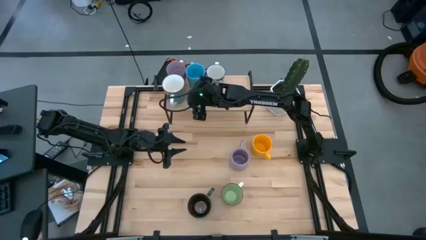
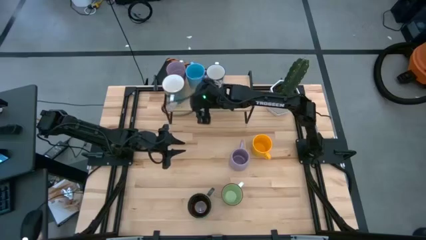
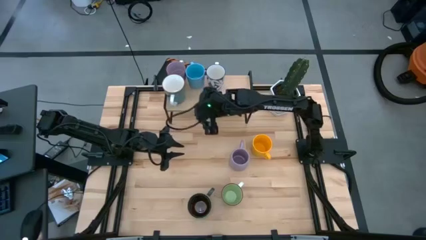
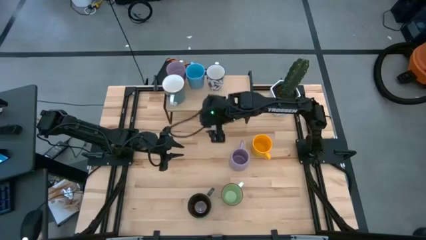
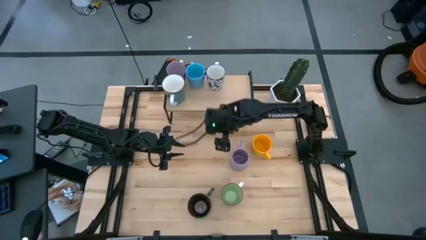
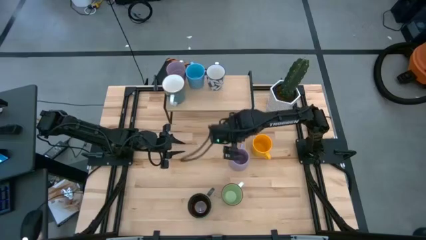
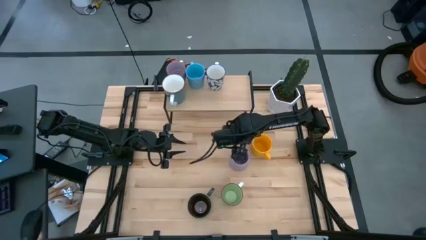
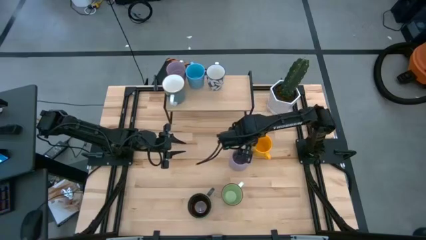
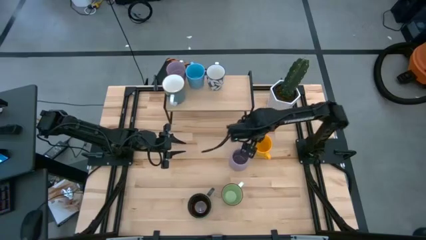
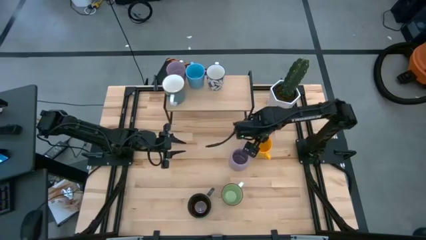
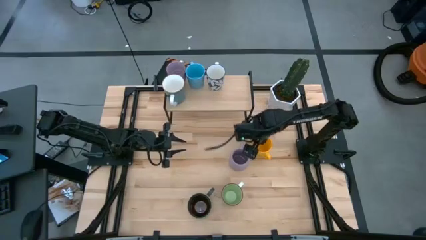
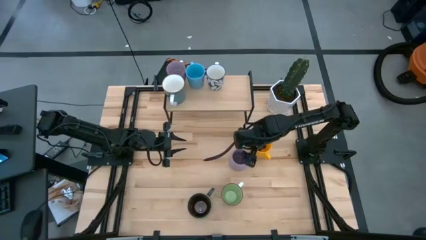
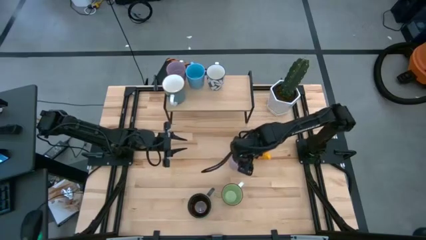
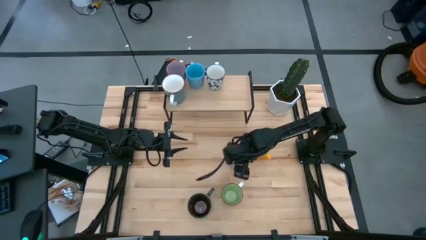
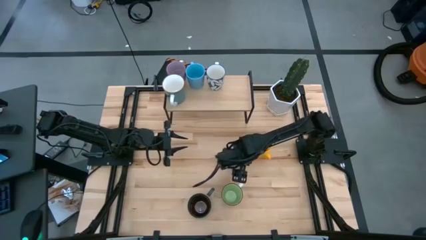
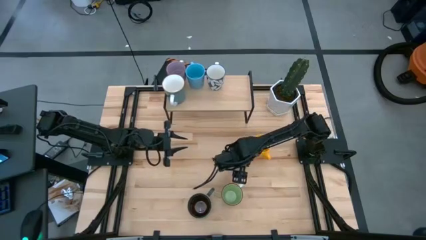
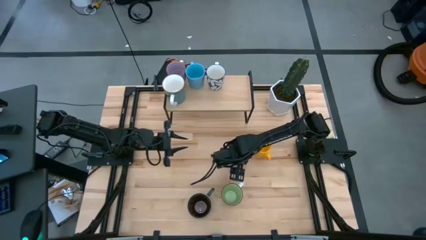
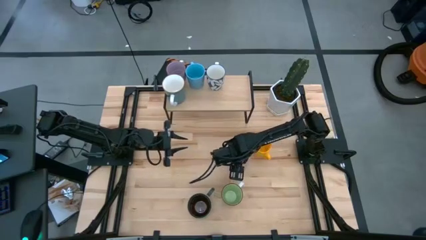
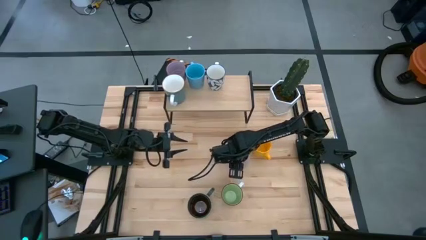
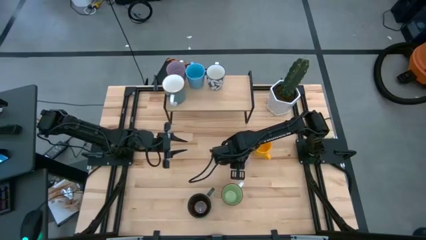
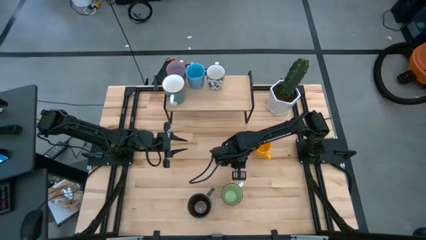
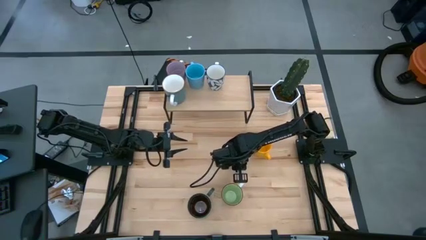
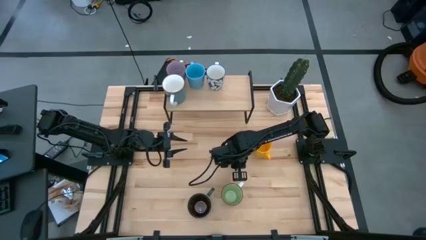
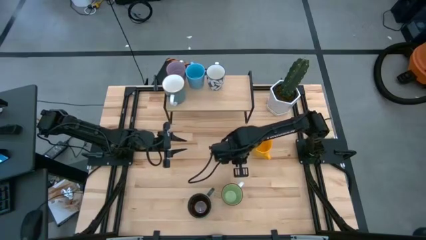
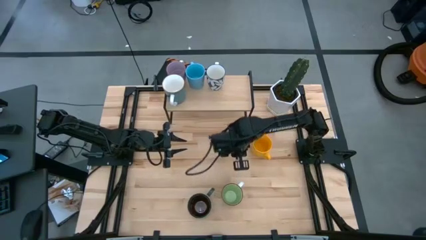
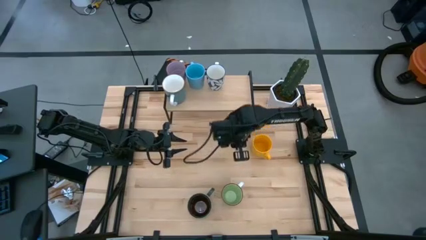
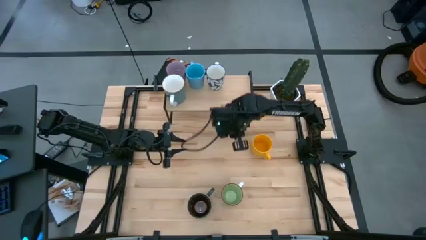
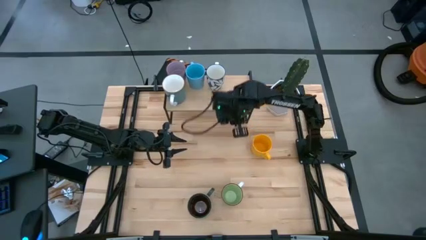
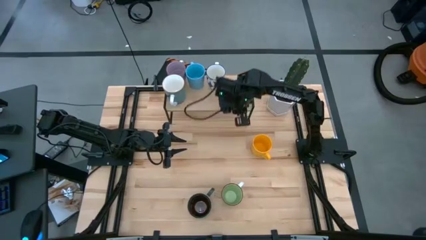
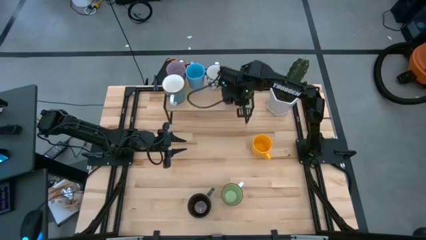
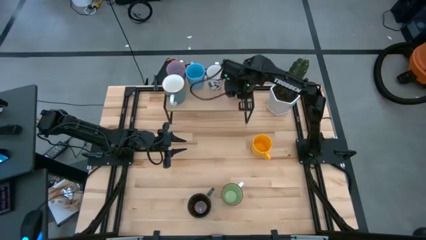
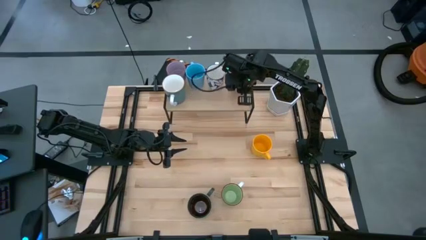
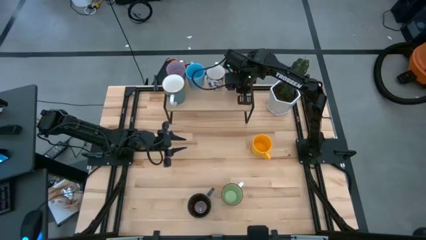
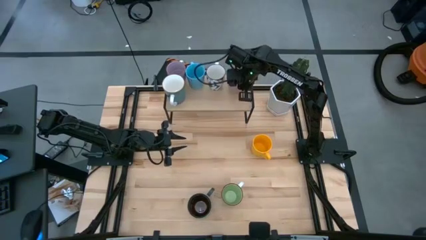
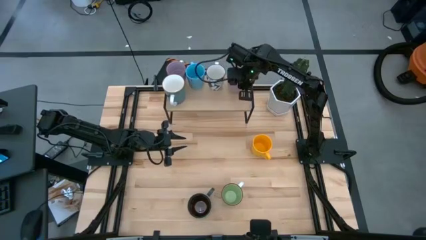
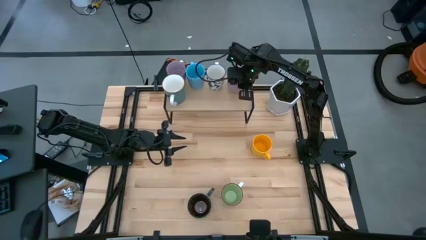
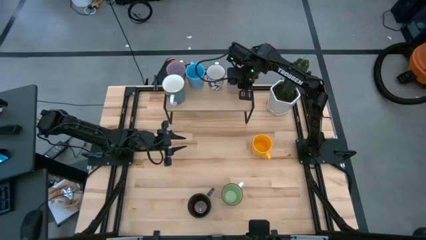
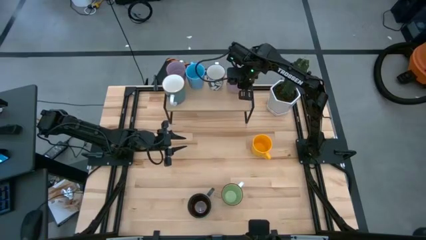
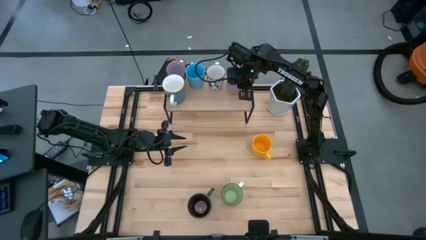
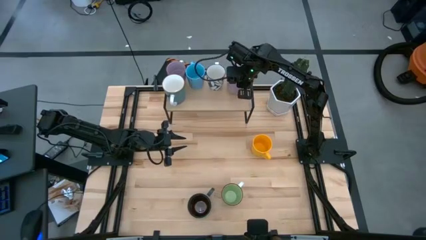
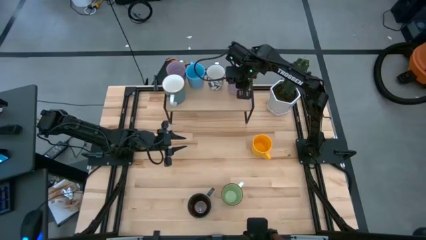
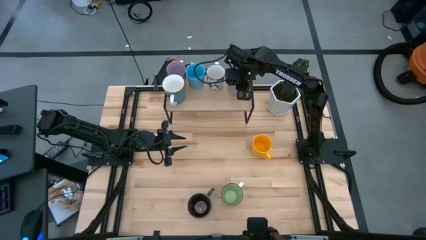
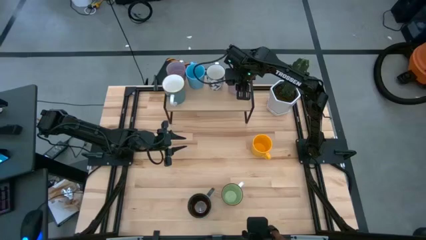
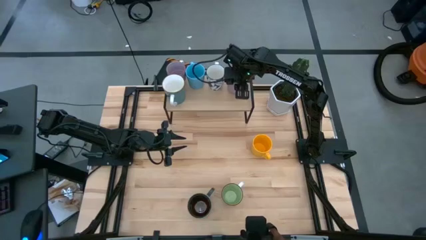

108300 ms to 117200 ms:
Task: Place coffee mugs
Put the purple mug on the shelf

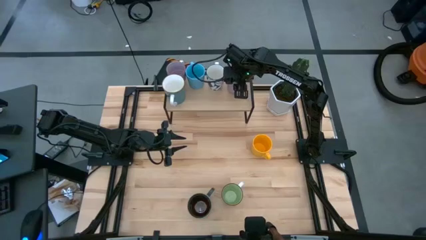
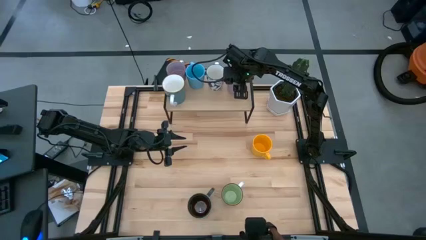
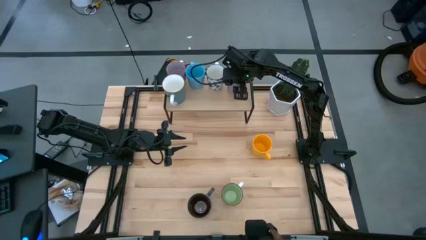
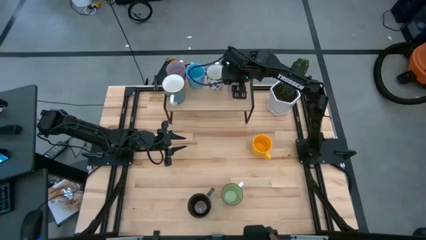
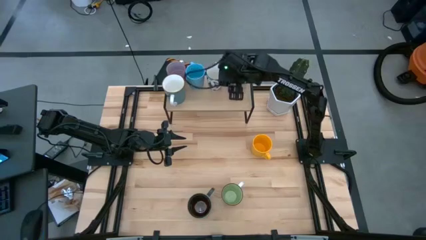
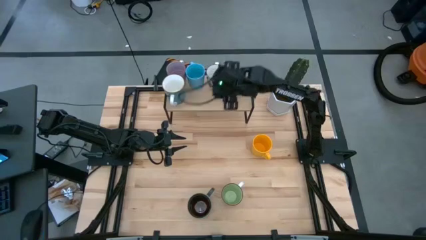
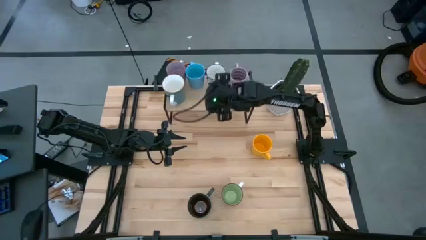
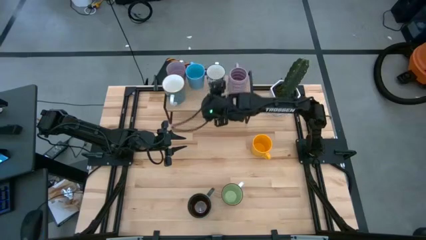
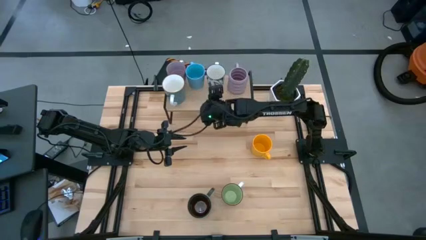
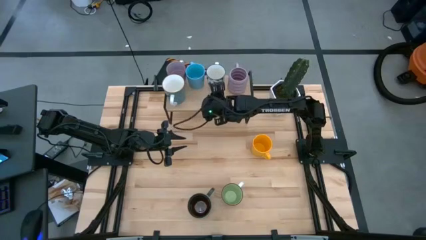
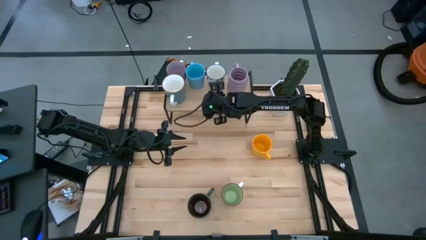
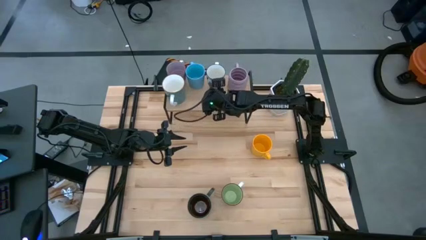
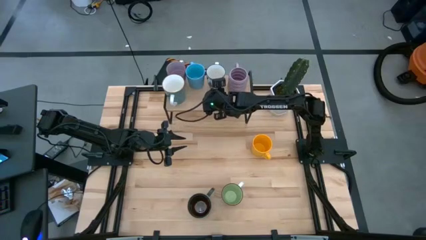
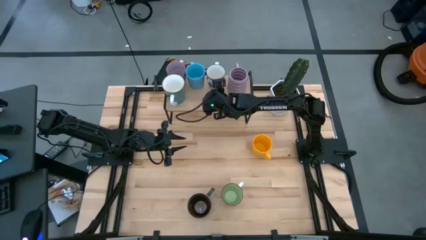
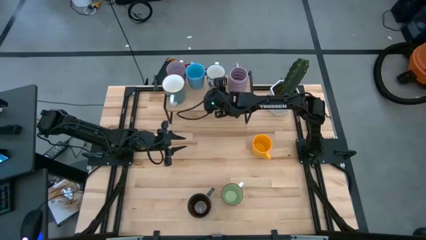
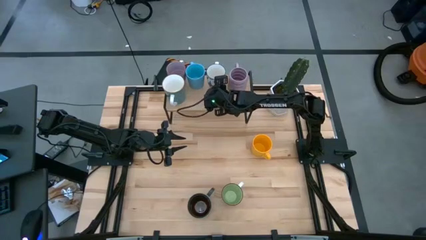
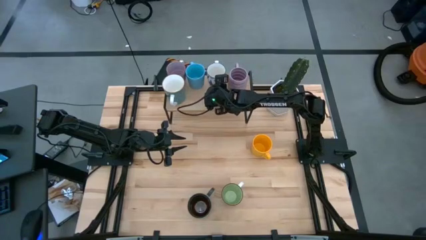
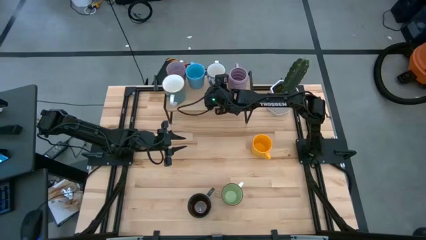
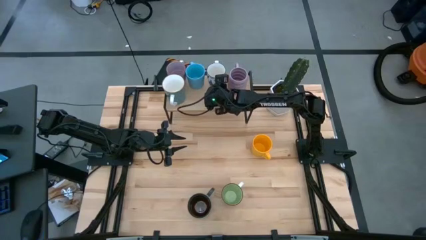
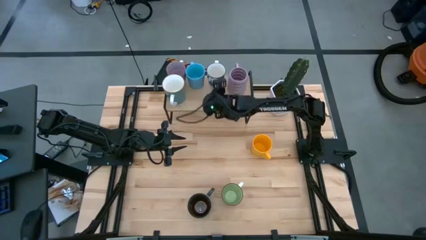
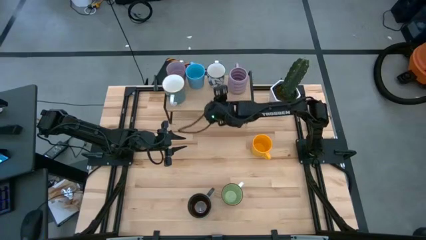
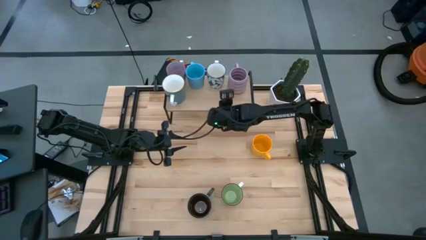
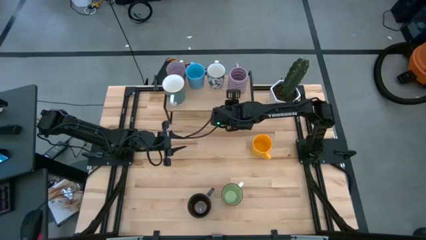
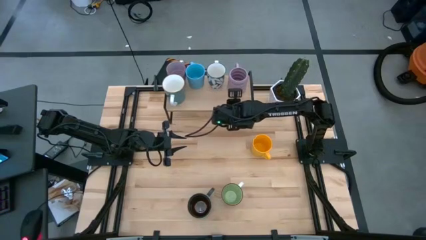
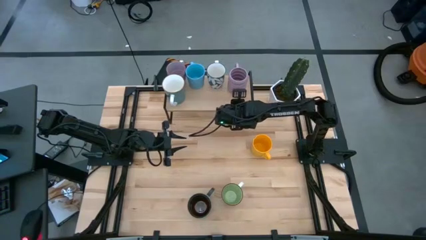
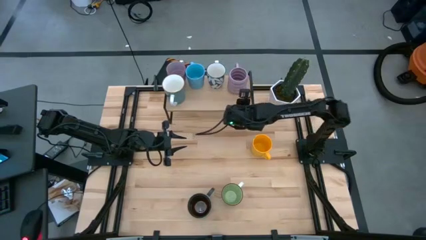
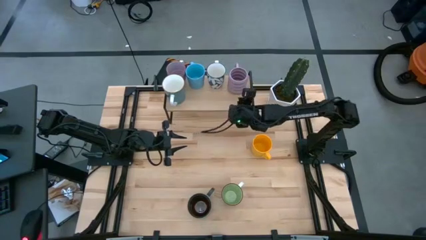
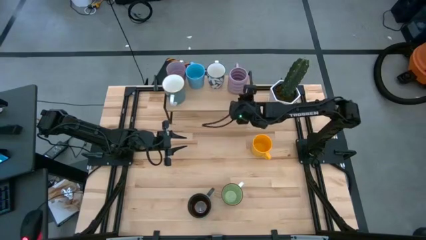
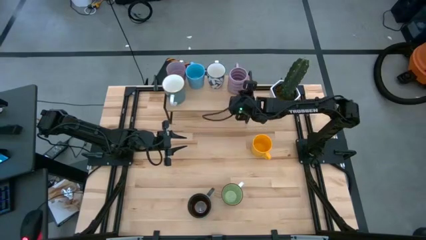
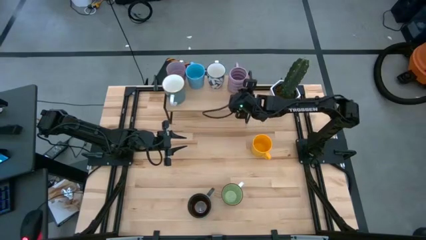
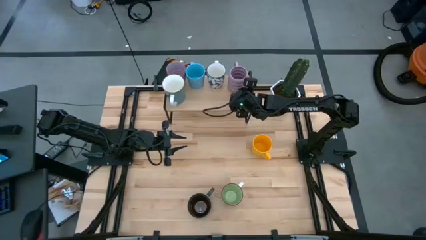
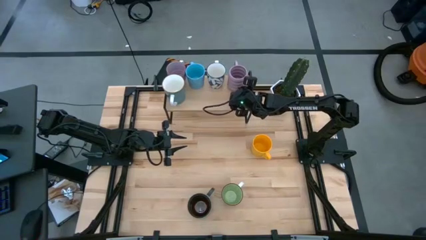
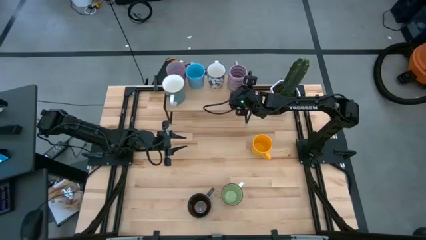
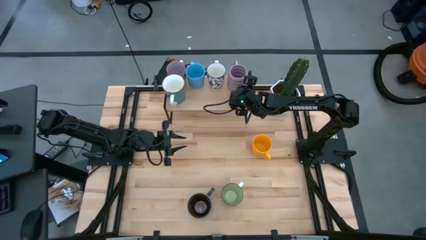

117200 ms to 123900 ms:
Adjust the mugs on the shelf
